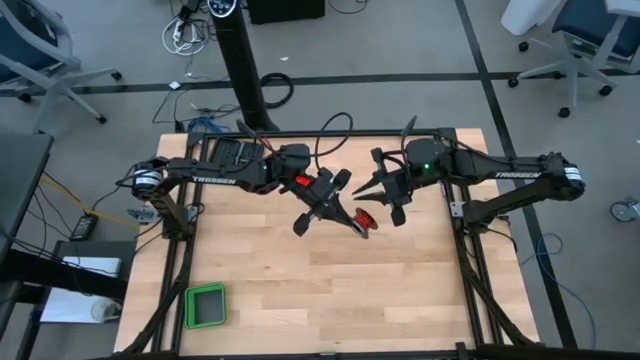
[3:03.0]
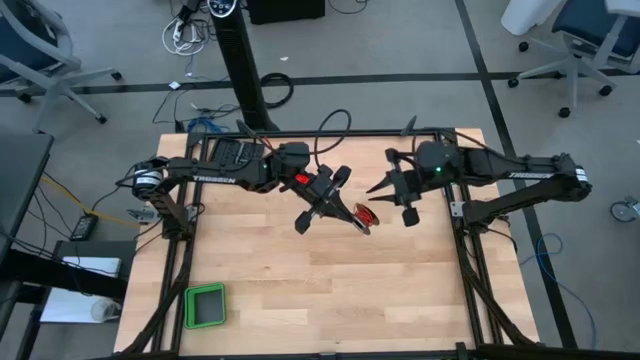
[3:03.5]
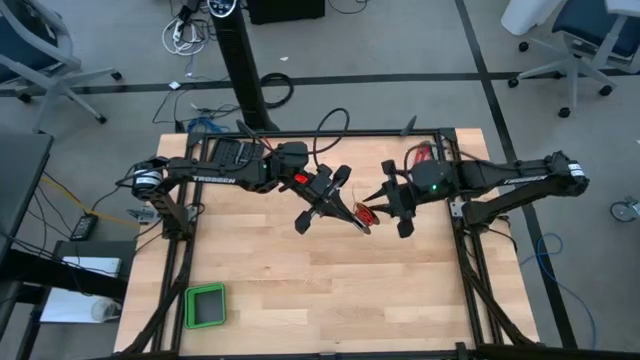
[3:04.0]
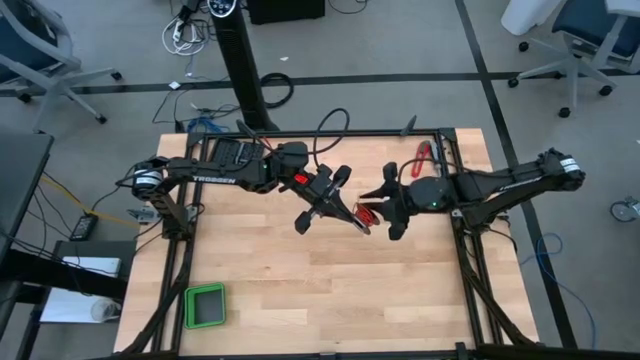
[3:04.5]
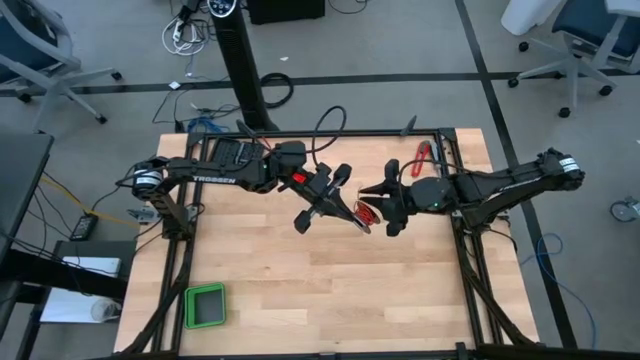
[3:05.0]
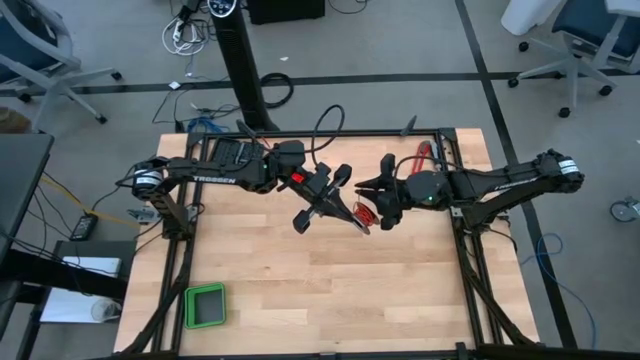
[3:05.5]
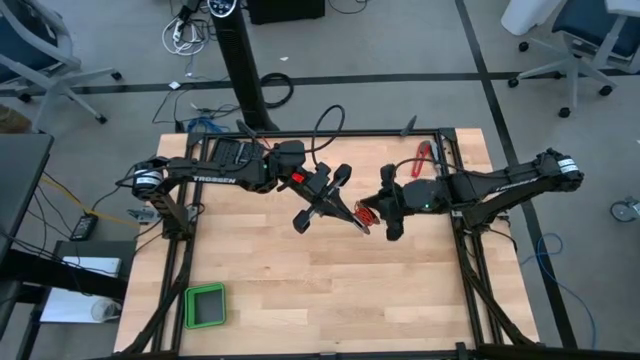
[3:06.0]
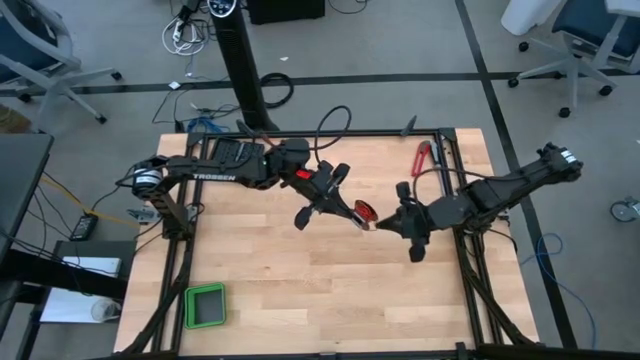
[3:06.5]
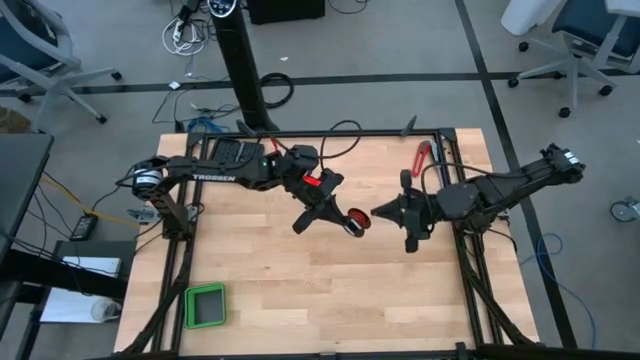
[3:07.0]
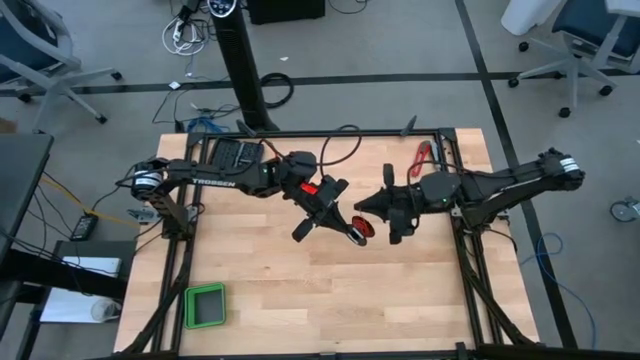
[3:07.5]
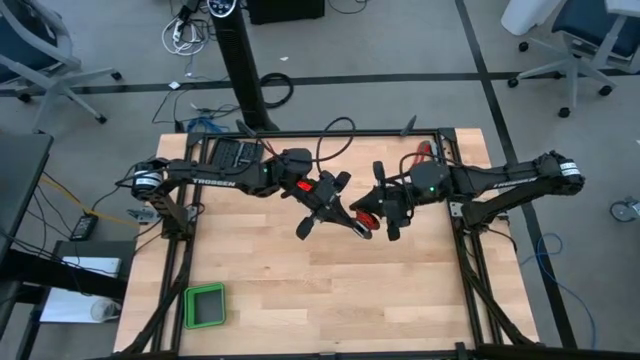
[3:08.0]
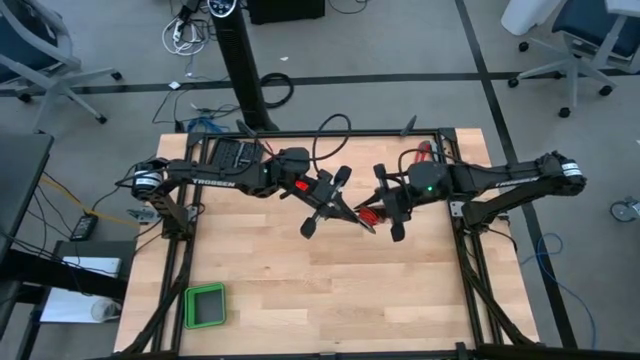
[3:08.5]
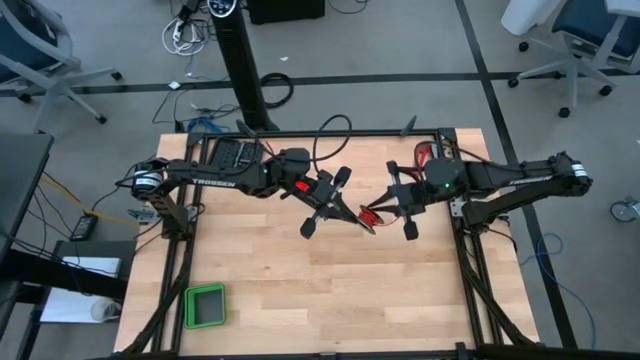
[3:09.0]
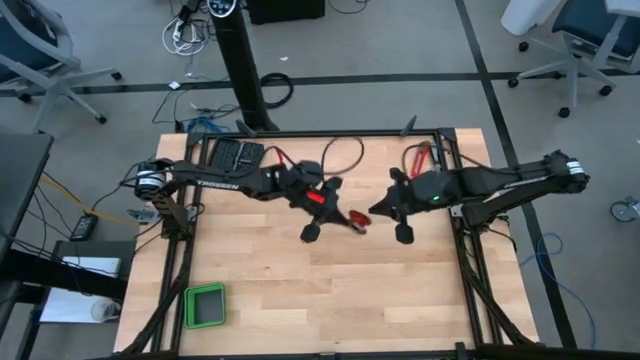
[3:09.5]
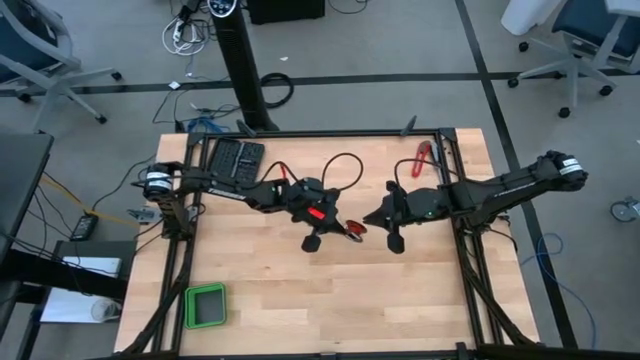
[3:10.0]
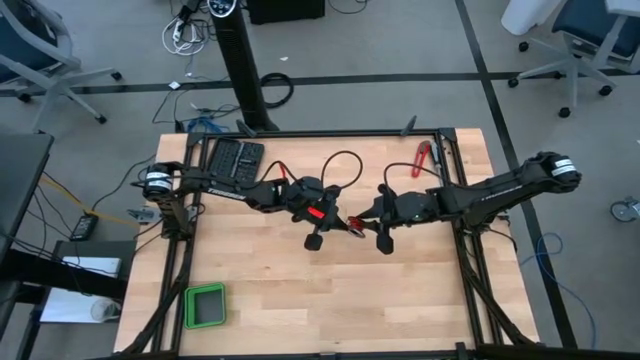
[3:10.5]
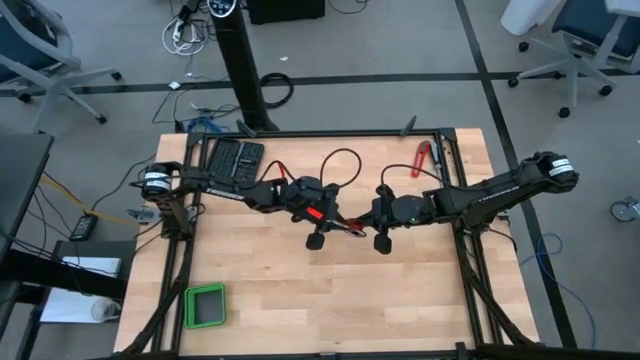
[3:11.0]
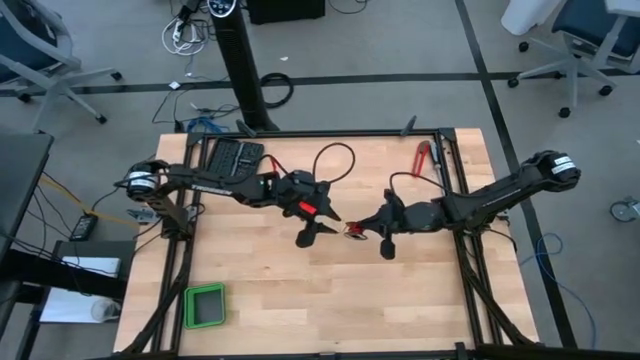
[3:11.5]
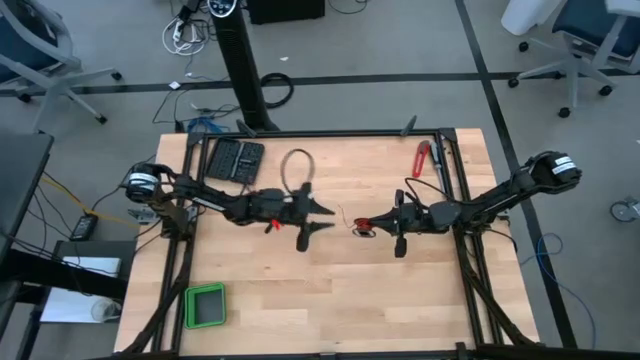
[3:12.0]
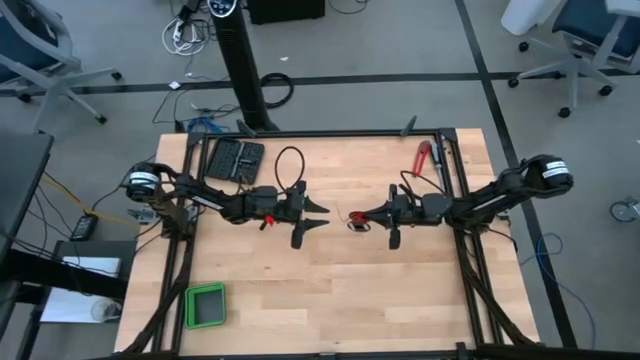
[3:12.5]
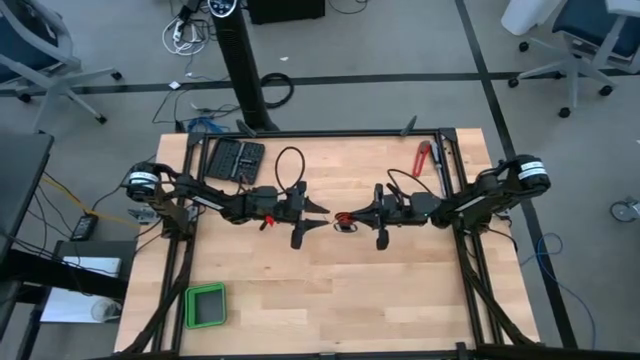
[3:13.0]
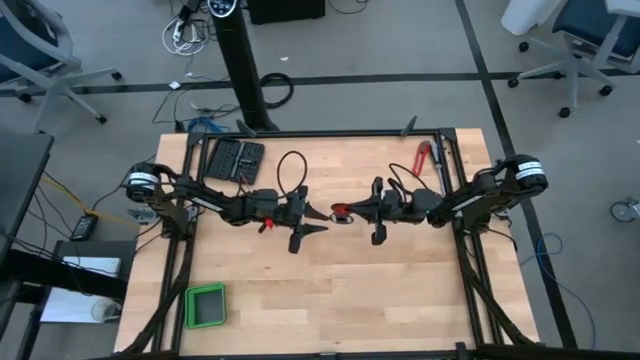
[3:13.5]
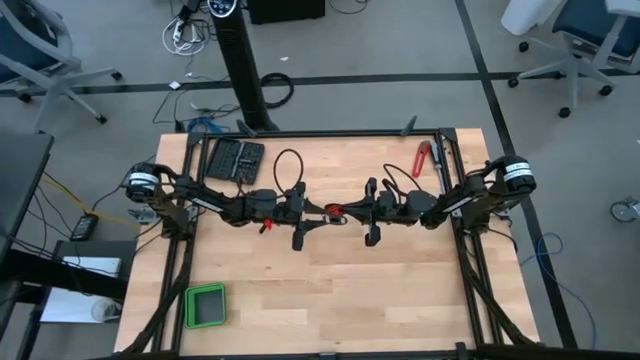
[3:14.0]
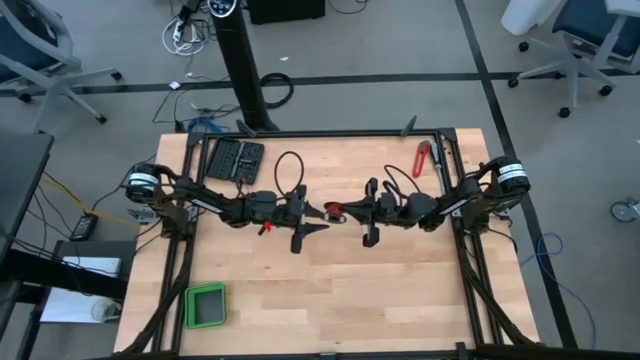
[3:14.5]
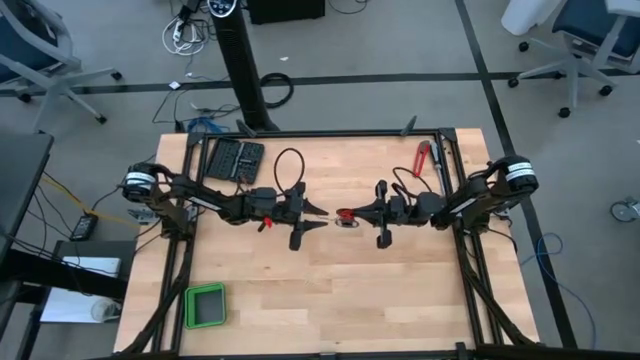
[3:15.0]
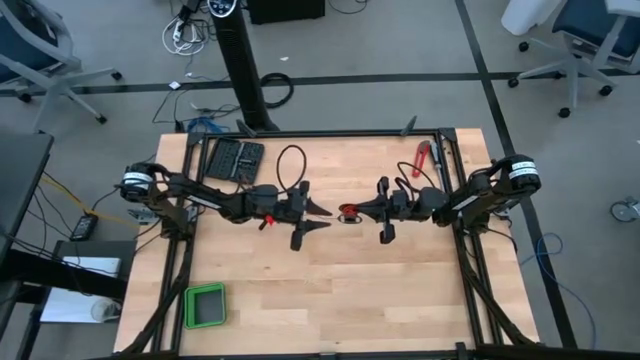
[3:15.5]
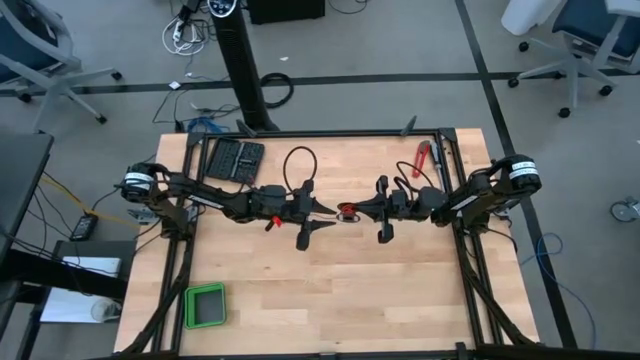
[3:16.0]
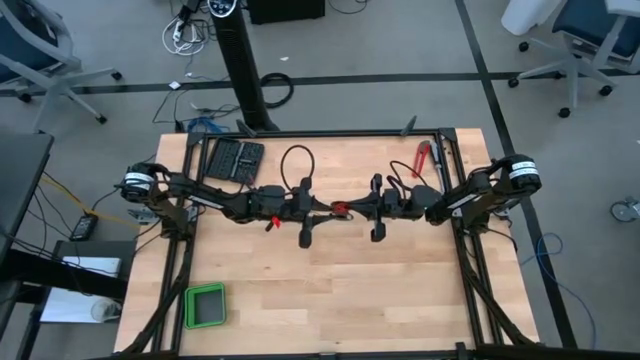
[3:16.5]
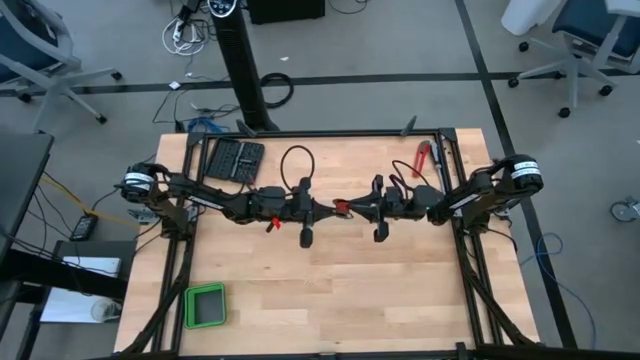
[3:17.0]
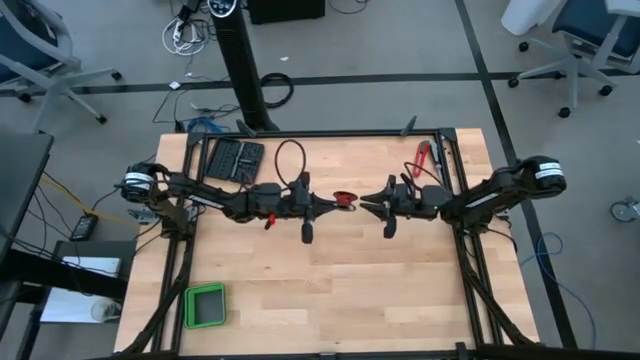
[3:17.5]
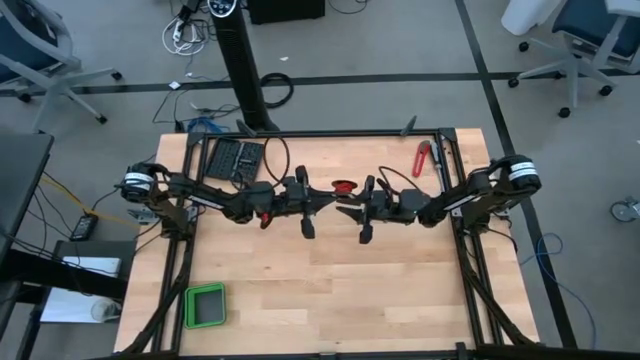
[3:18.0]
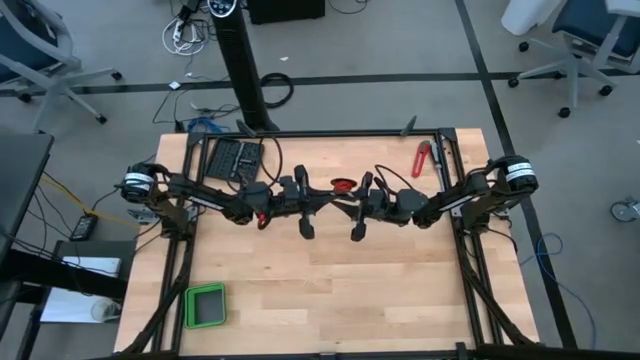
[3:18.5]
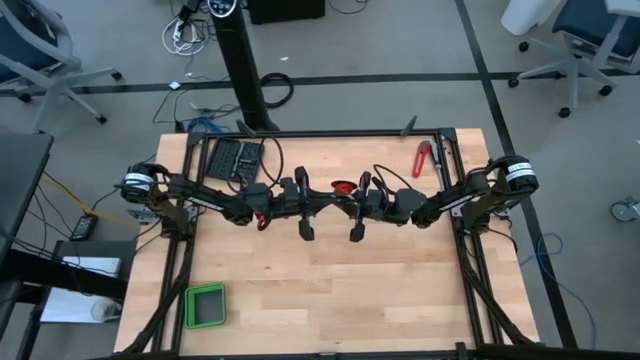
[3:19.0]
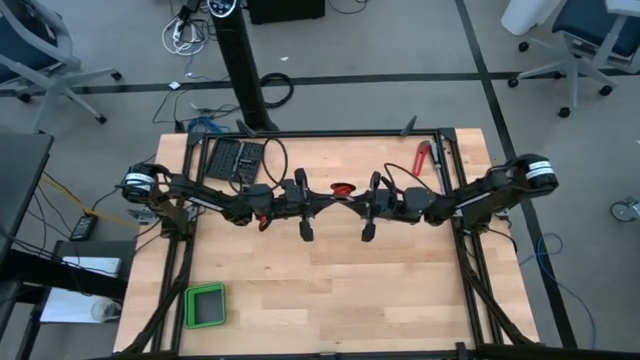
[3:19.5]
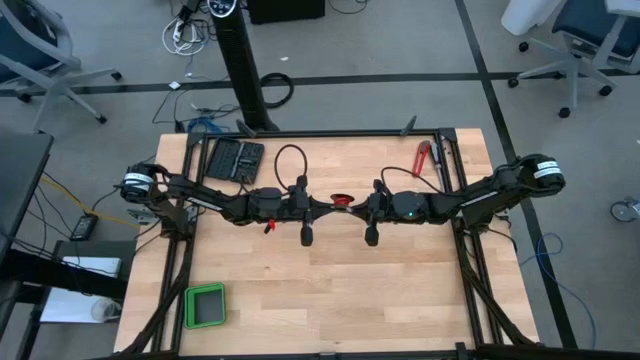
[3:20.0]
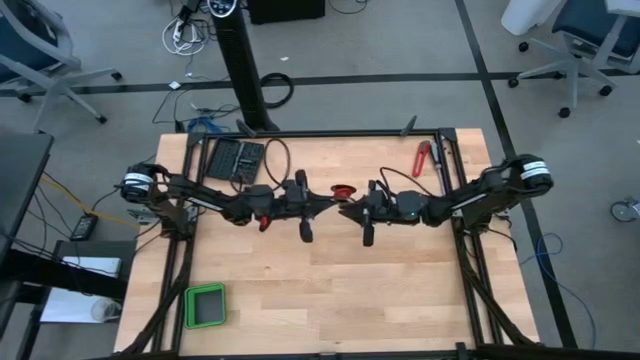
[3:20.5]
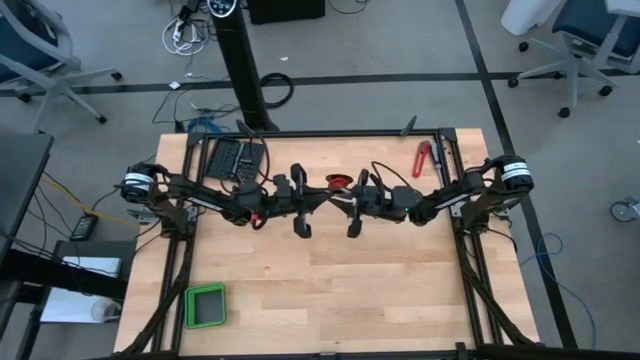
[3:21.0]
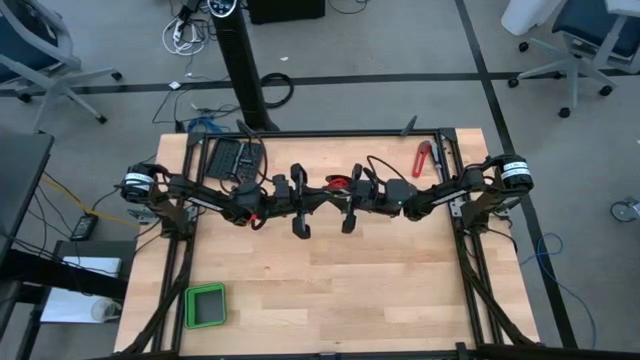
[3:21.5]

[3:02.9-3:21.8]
Task: Coil cords
Coil the red wire onto the black spool

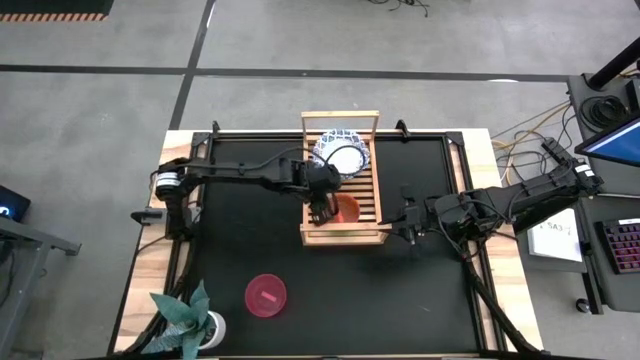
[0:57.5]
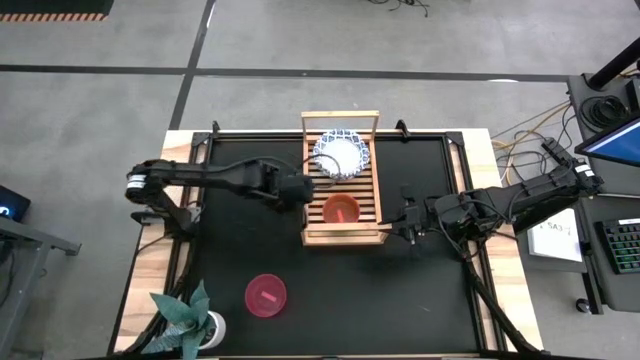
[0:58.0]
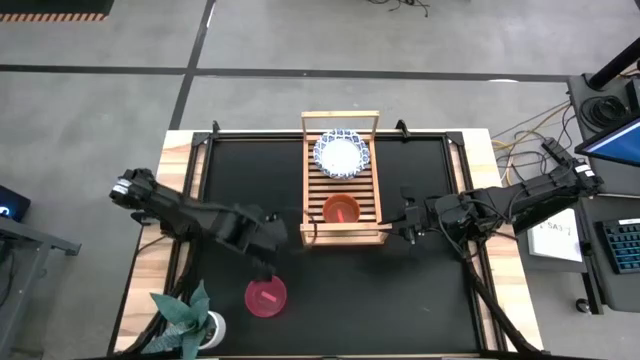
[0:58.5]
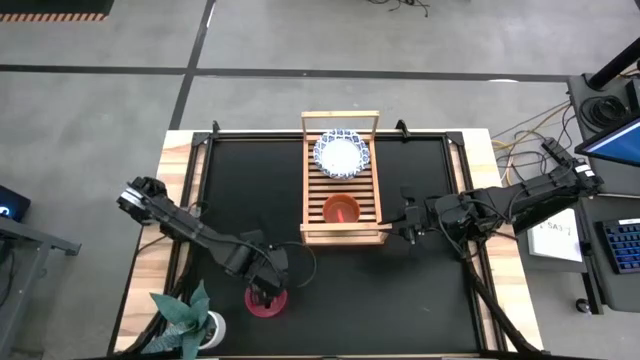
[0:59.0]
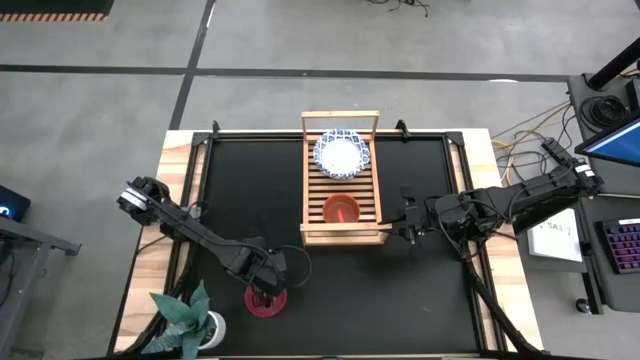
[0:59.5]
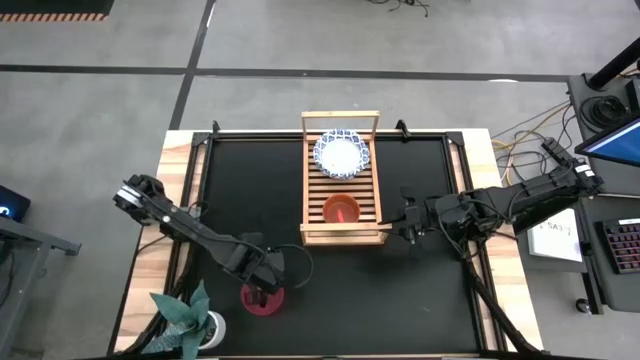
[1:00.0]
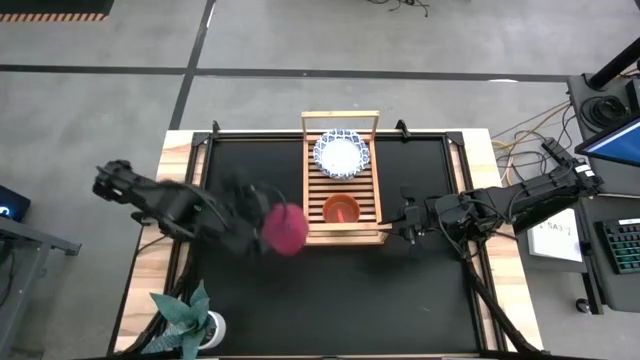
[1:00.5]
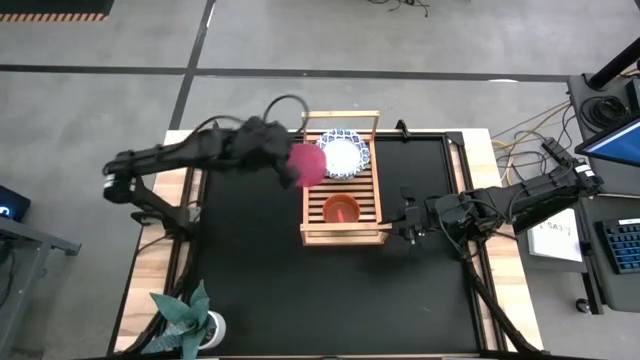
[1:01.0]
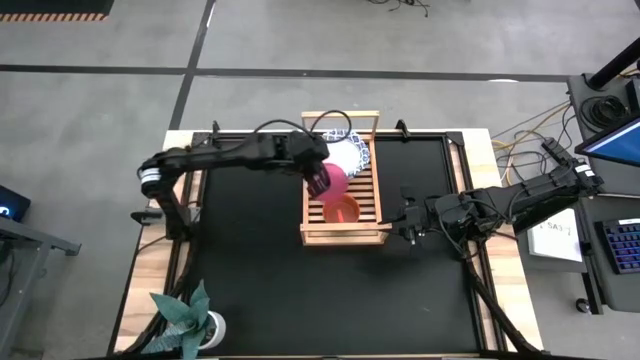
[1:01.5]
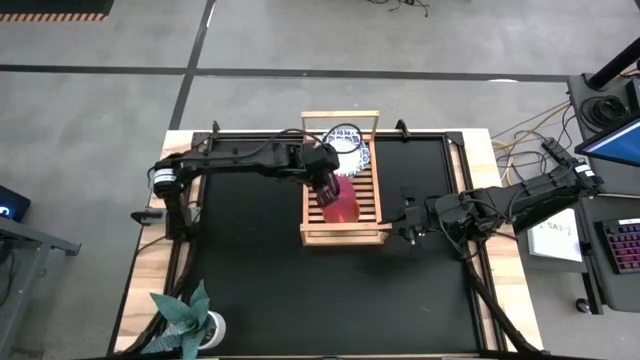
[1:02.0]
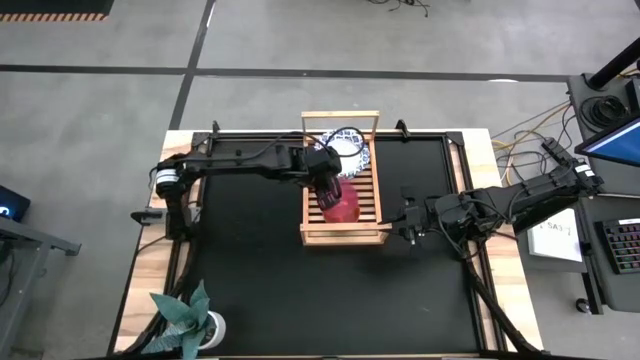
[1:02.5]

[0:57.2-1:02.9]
Task: Place and stack bowls onto a shelf
Stack the pink bowl on top of the orange bowl on the shelf
